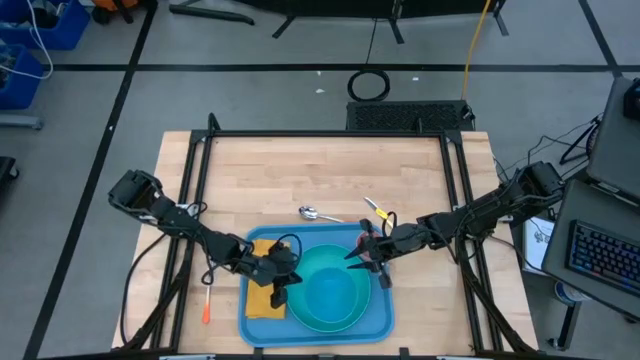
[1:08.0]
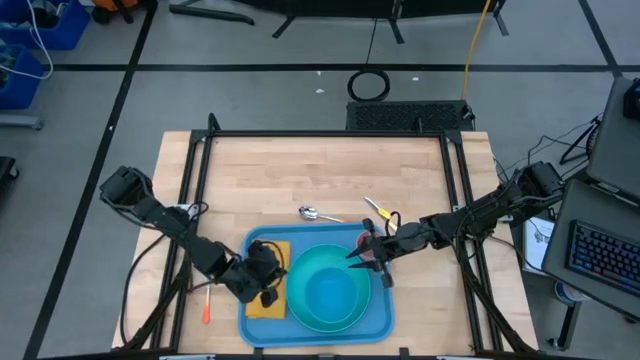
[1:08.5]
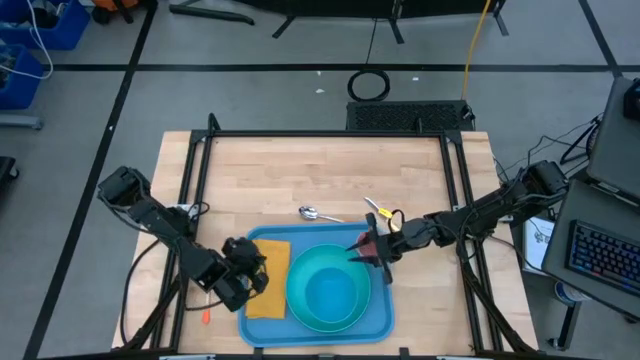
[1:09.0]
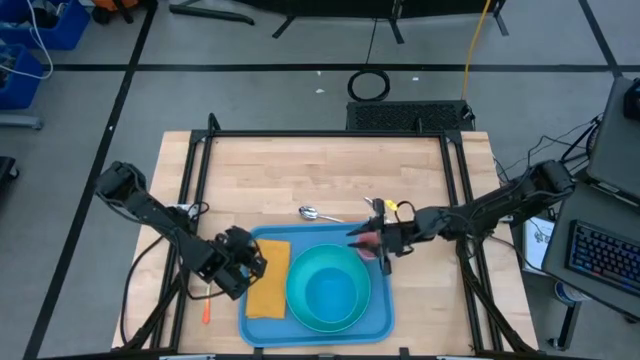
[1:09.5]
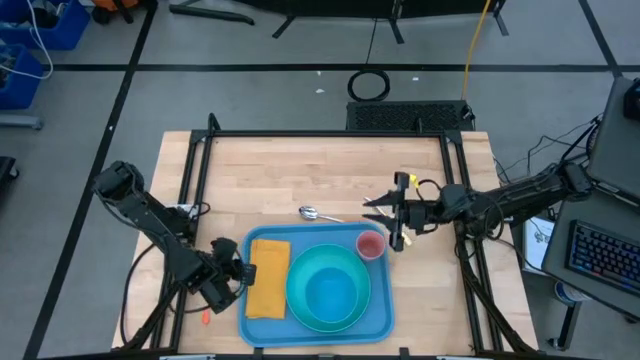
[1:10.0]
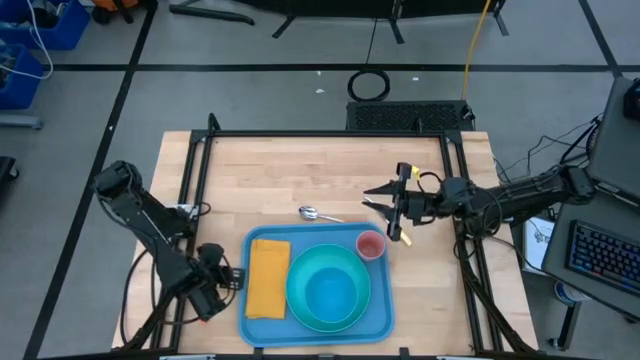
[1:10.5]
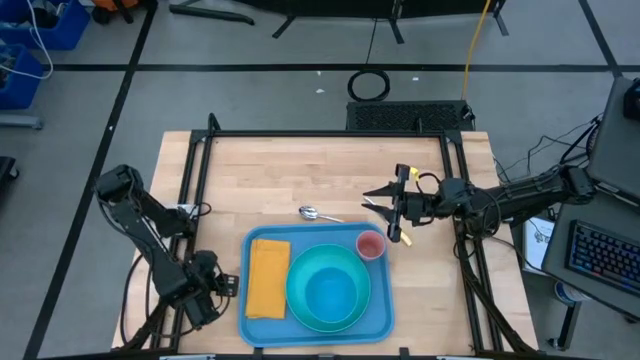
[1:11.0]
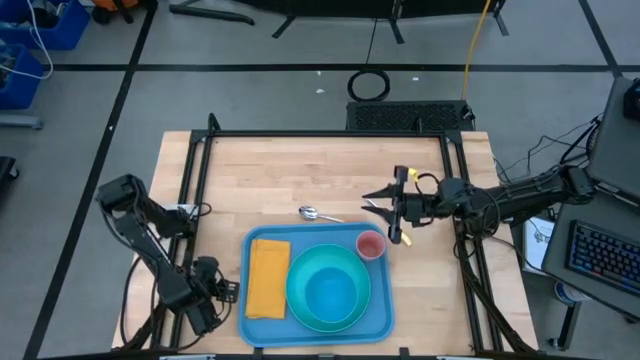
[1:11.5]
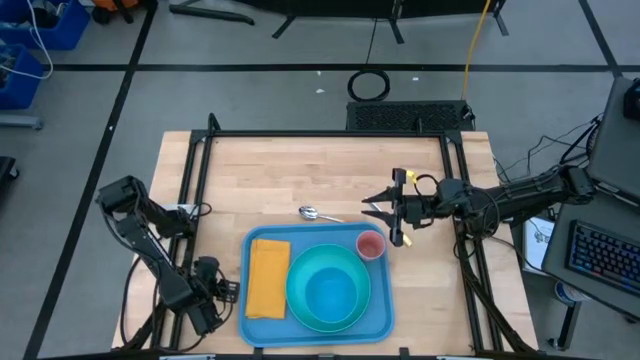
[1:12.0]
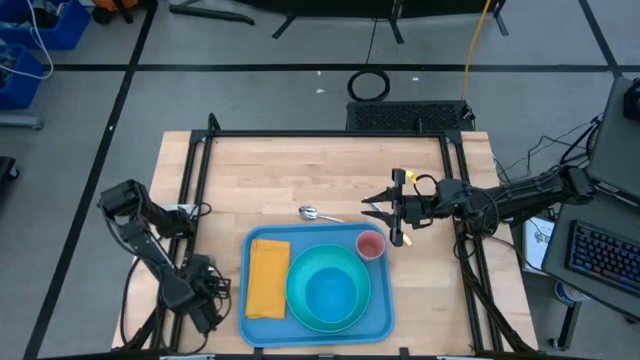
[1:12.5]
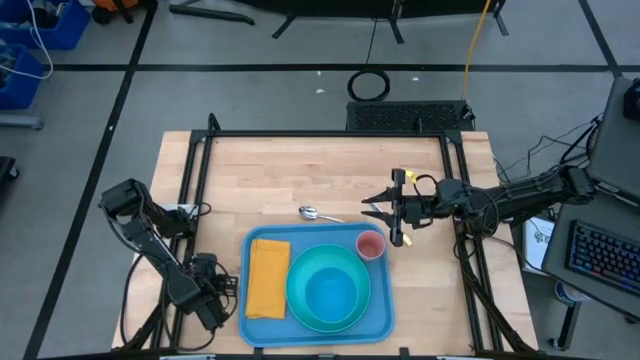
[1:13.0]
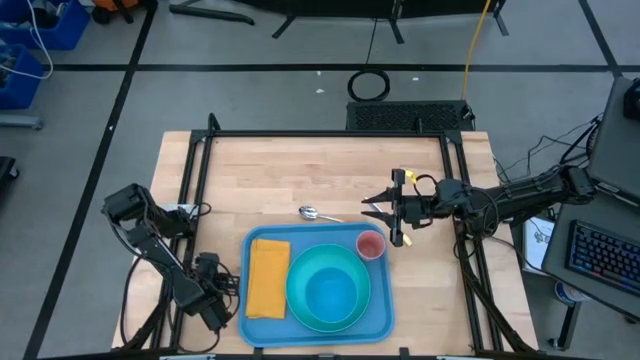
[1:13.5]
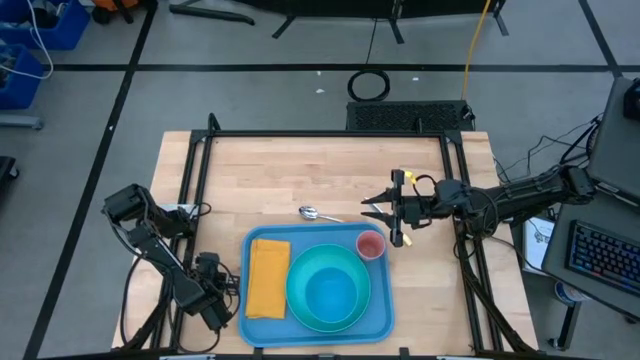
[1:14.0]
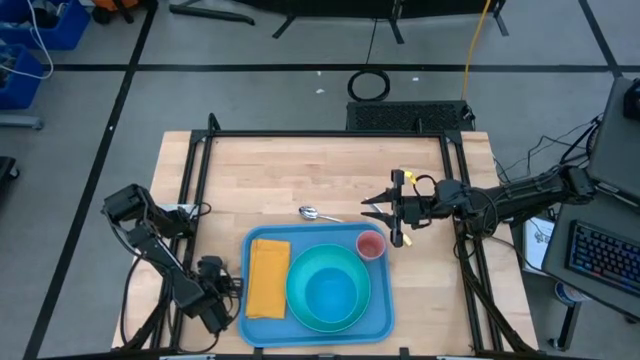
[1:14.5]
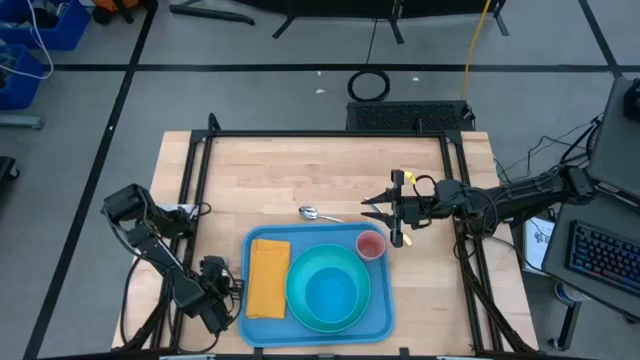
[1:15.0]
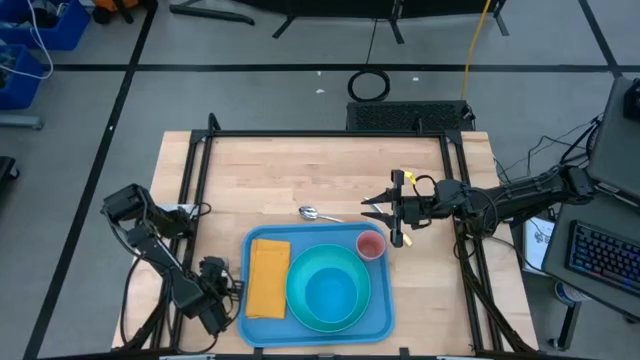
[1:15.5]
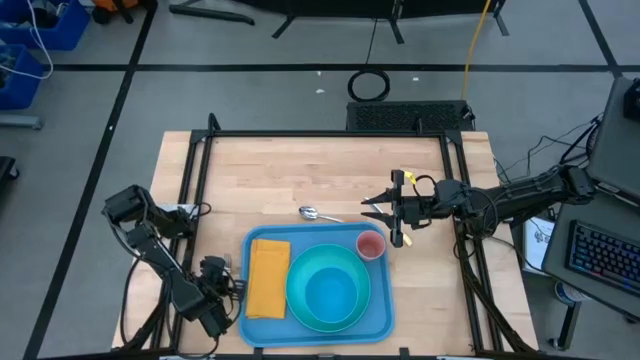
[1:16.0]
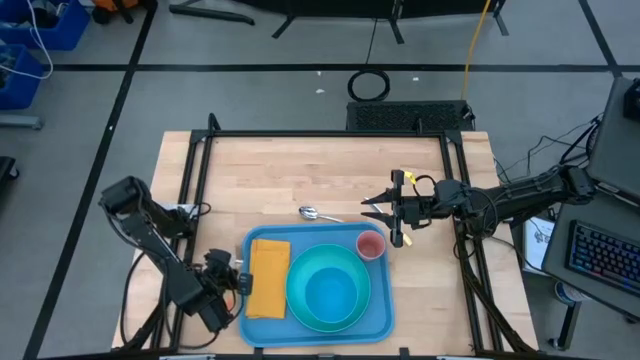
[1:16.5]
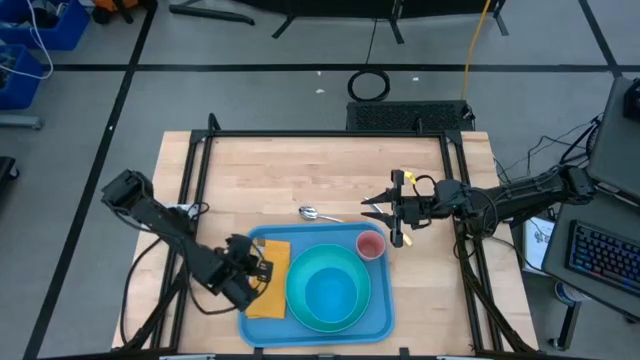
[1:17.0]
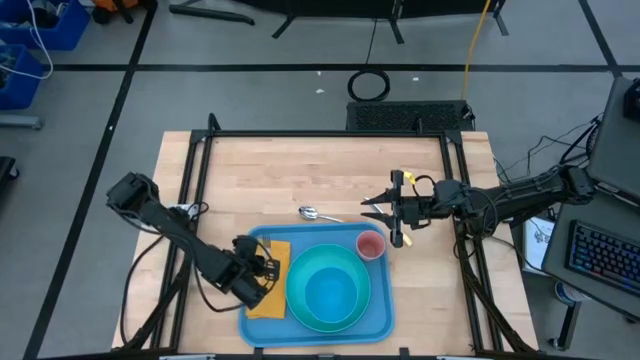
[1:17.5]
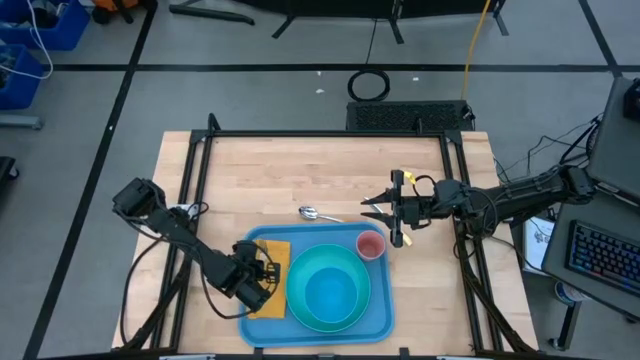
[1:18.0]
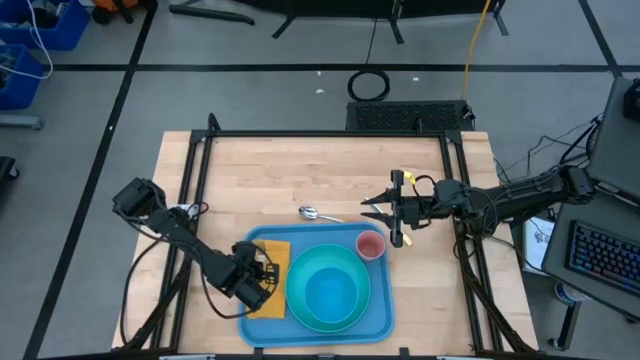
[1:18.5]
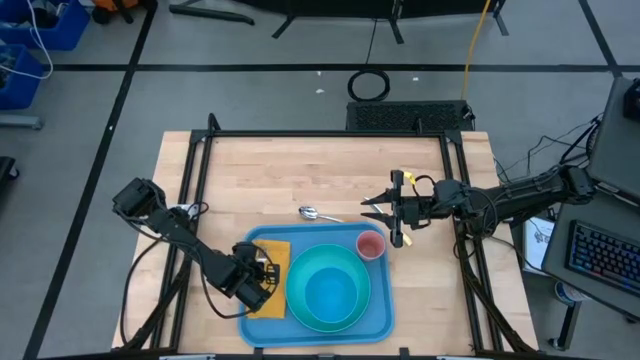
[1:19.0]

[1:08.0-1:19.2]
Task: Set up tray
Put the orange fork on top of the yellow table napkin on the blue tray

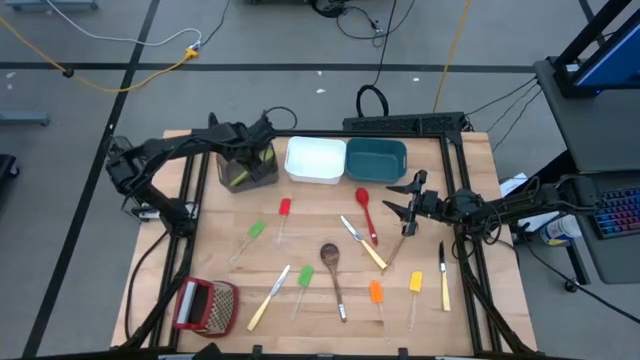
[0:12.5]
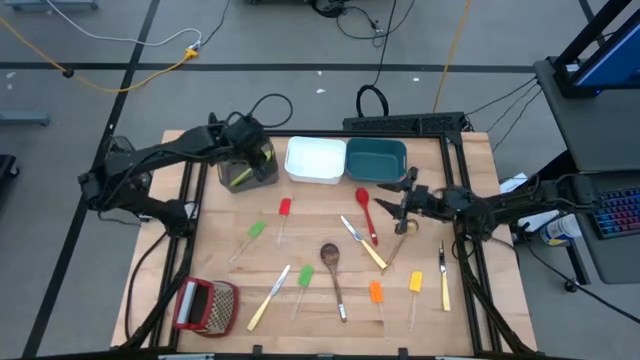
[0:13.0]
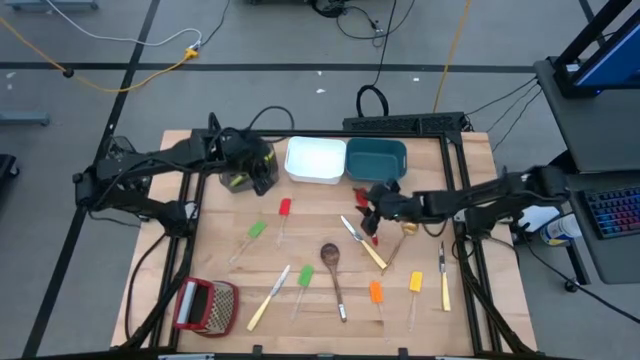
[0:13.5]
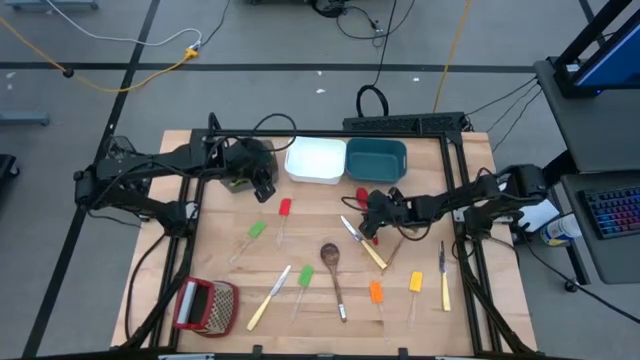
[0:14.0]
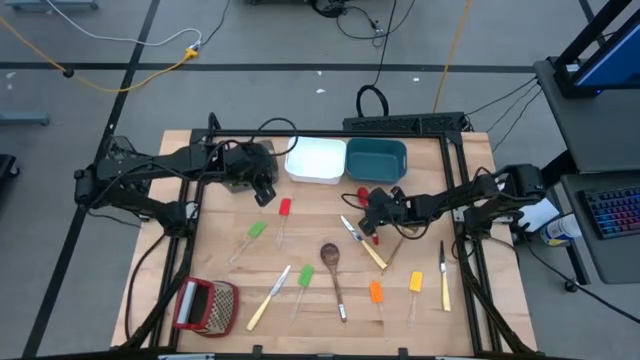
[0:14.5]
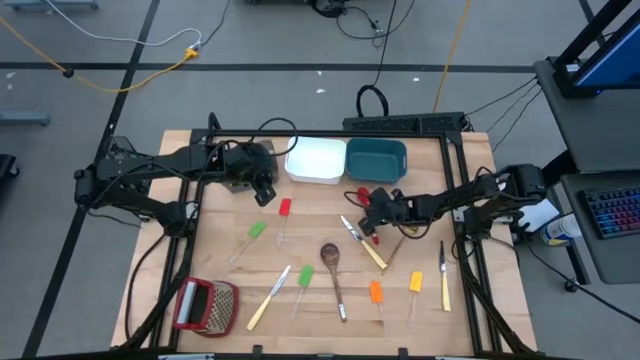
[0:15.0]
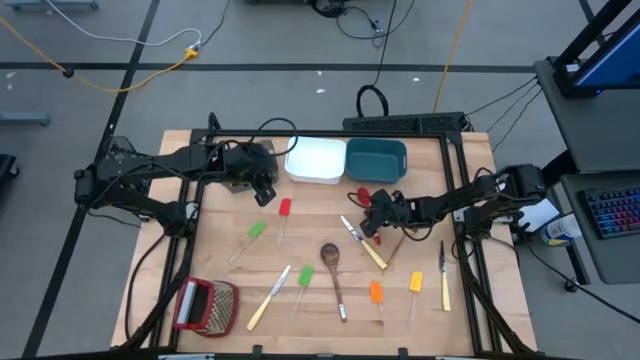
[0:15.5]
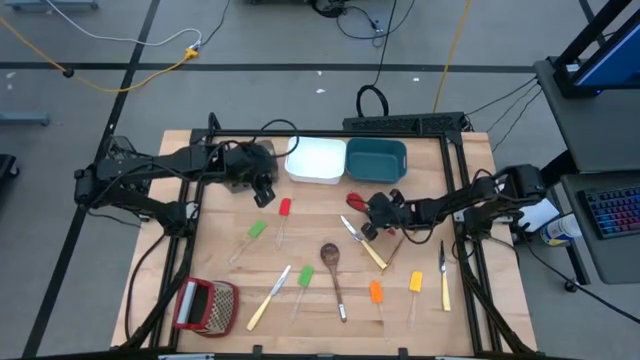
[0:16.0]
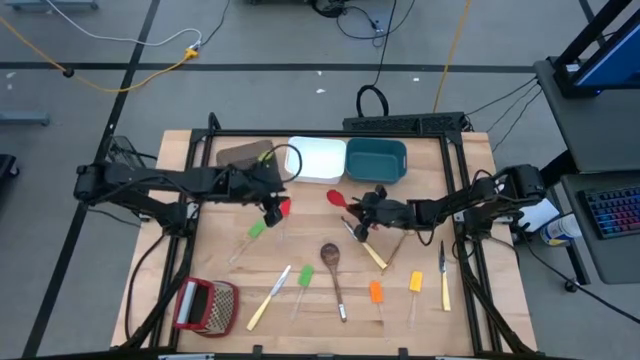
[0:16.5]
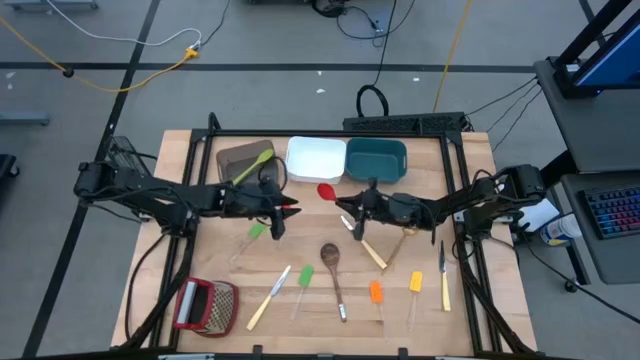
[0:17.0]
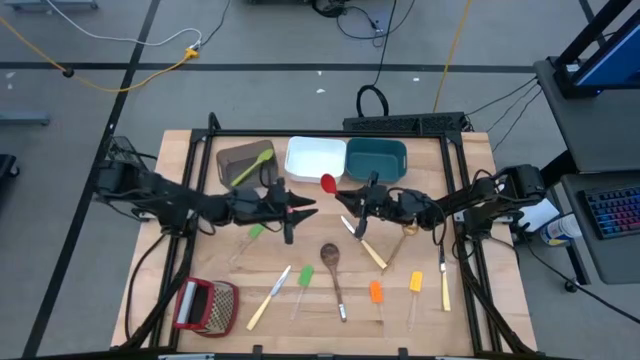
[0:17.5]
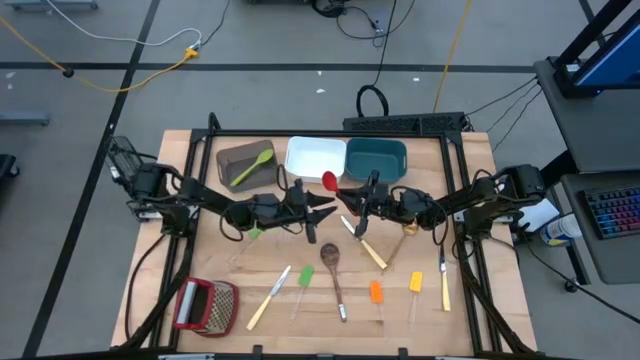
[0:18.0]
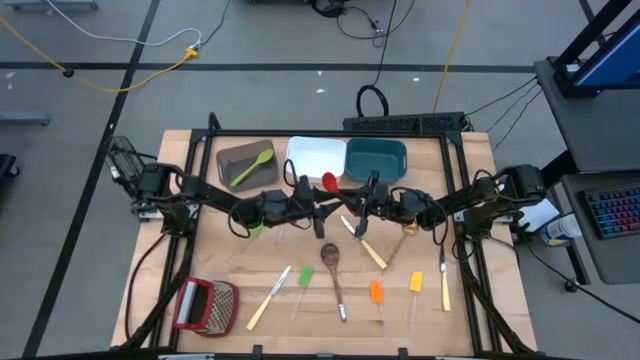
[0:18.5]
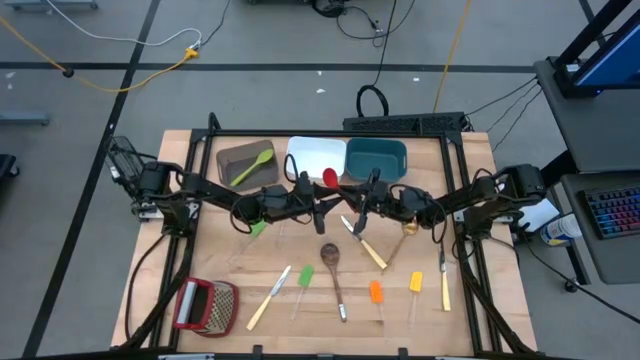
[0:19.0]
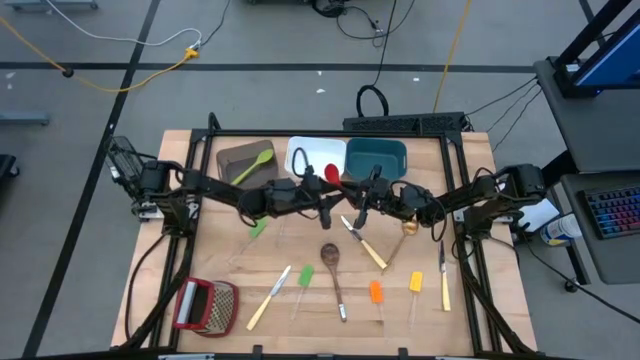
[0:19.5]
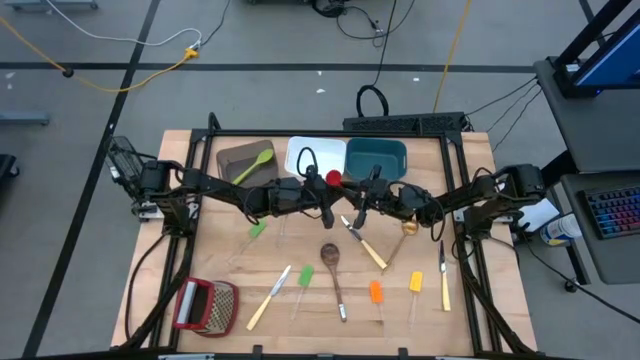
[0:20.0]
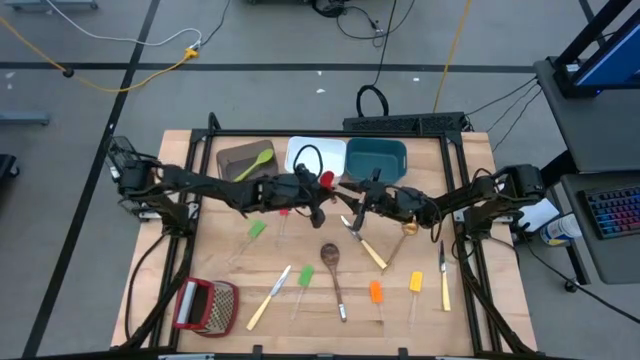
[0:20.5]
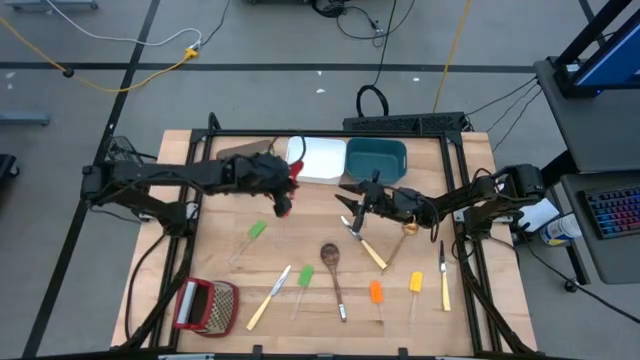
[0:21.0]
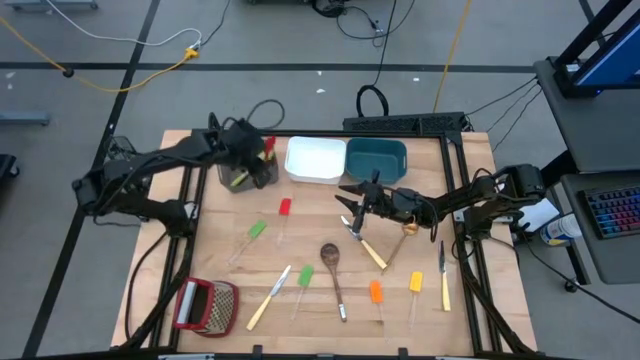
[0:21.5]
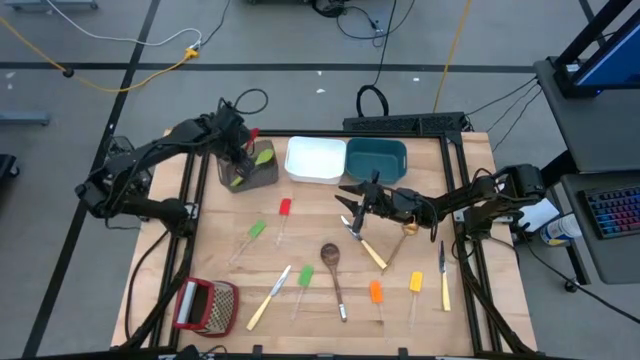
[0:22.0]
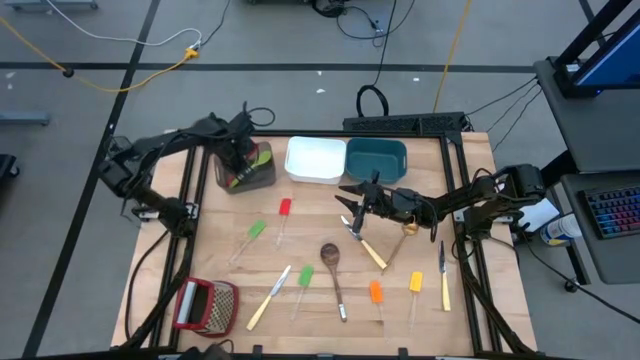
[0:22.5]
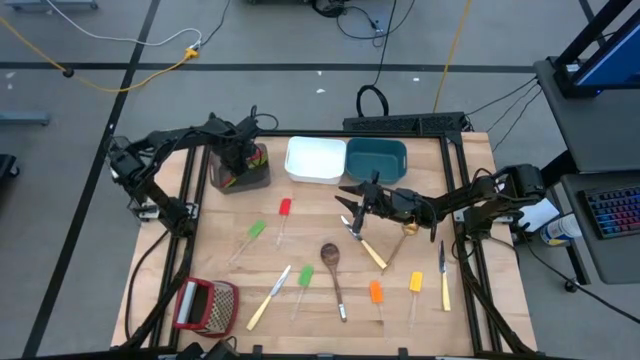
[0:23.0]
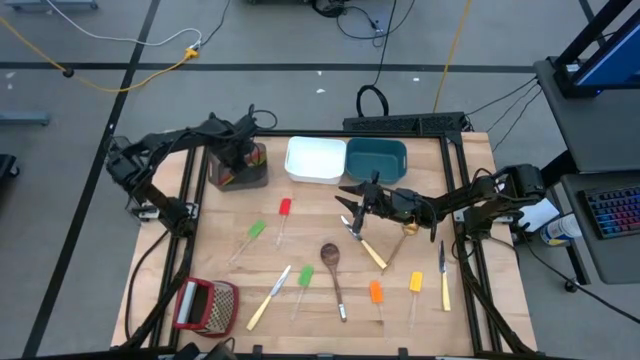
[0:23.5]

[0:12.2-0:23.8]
Task: Pick & Place Kitchen Items
Put the red serving spoon into the black bin
